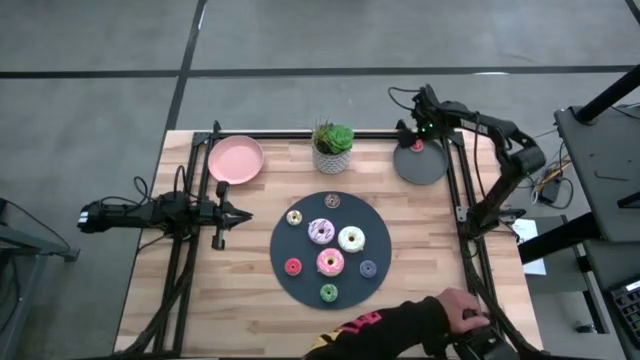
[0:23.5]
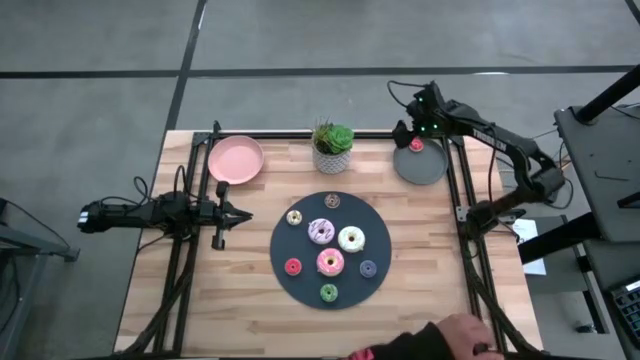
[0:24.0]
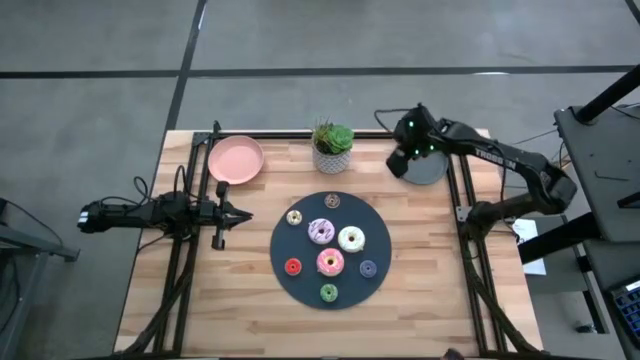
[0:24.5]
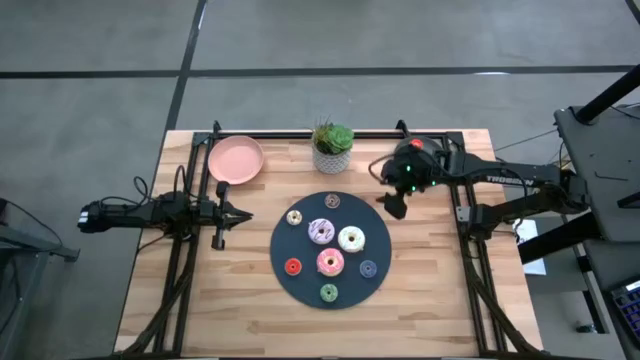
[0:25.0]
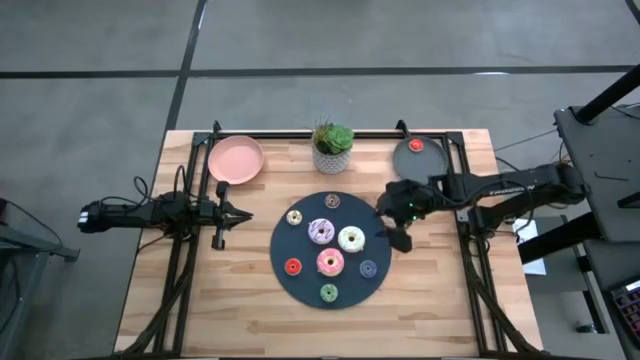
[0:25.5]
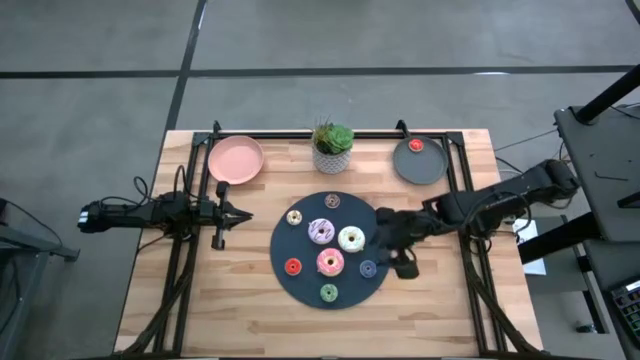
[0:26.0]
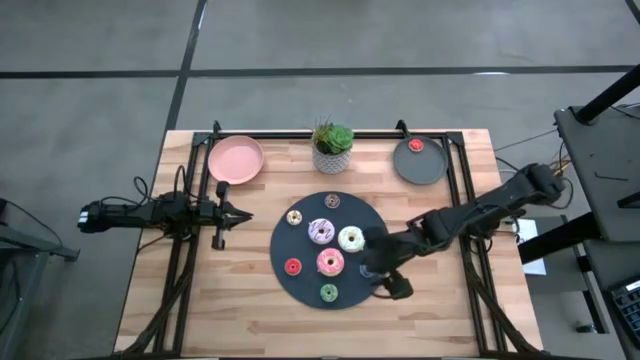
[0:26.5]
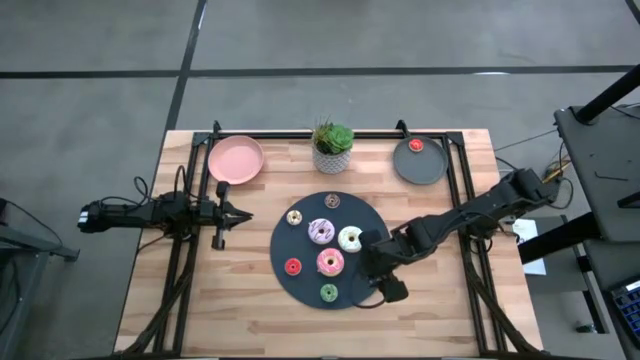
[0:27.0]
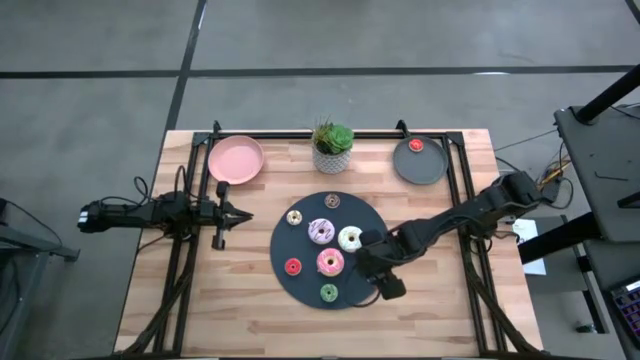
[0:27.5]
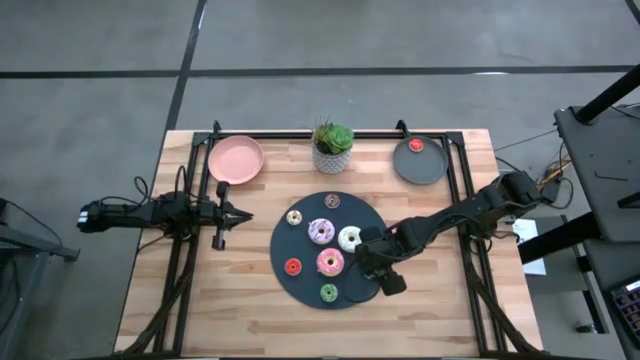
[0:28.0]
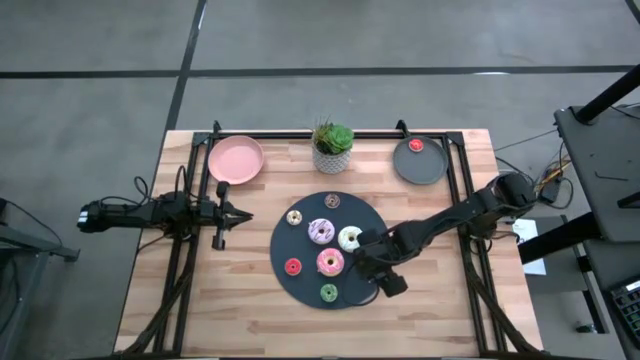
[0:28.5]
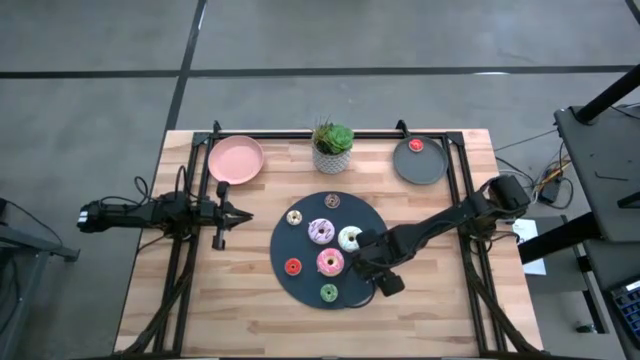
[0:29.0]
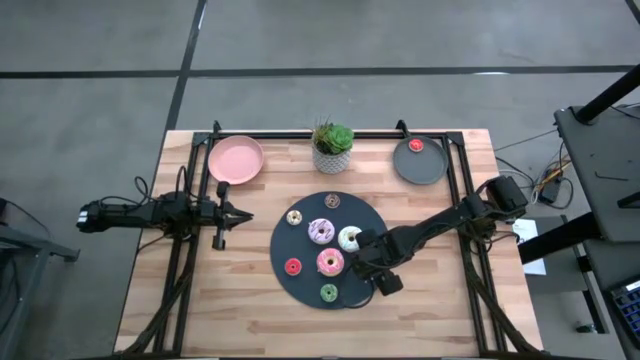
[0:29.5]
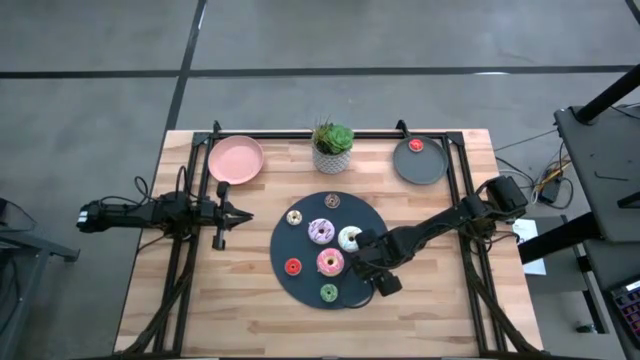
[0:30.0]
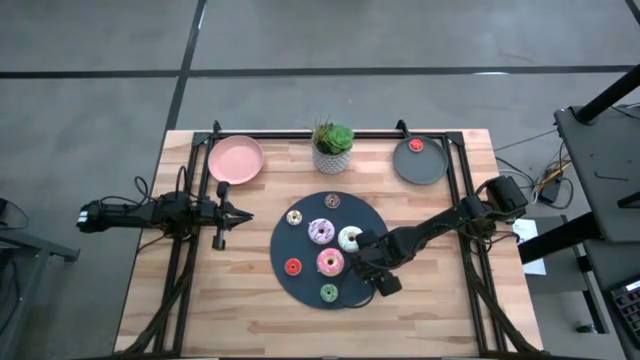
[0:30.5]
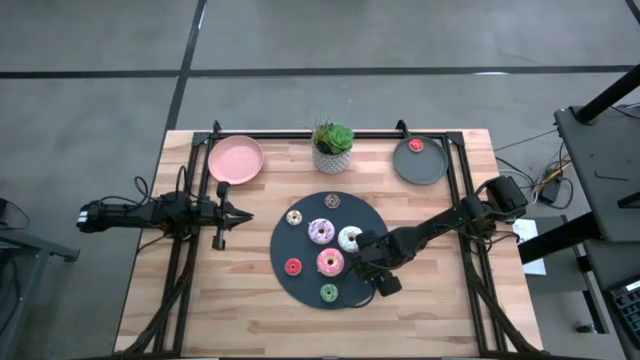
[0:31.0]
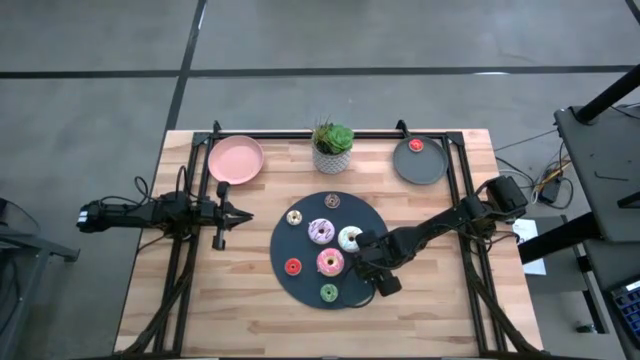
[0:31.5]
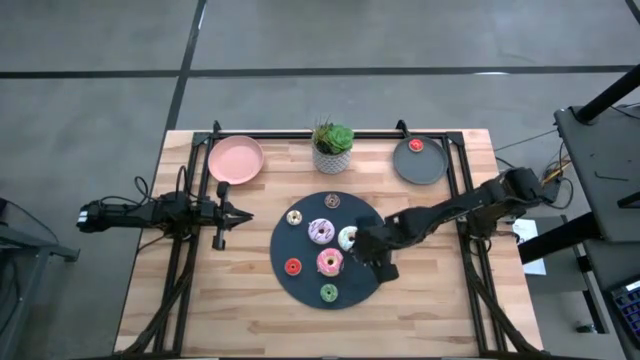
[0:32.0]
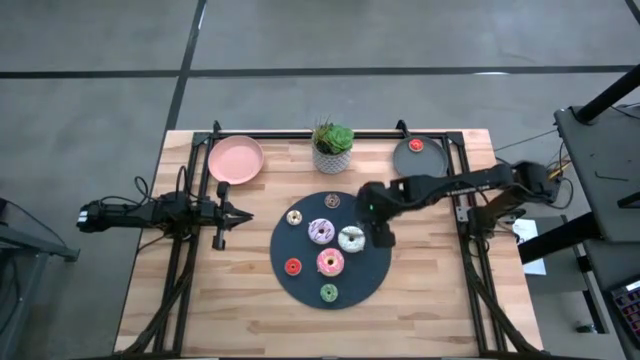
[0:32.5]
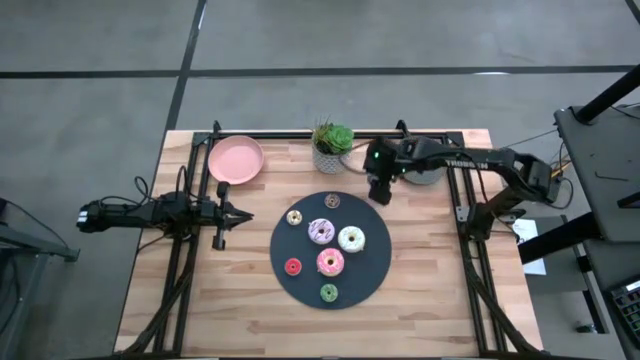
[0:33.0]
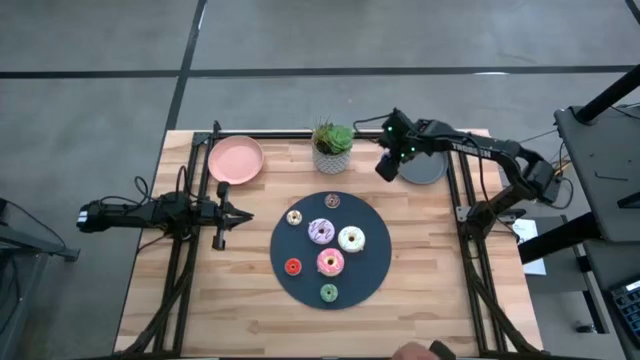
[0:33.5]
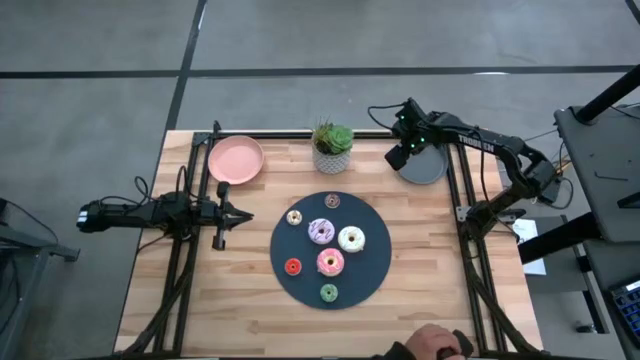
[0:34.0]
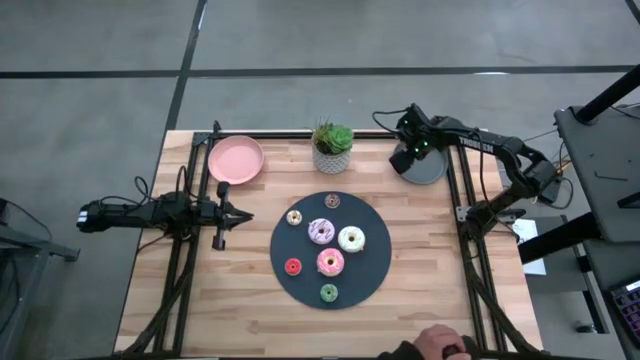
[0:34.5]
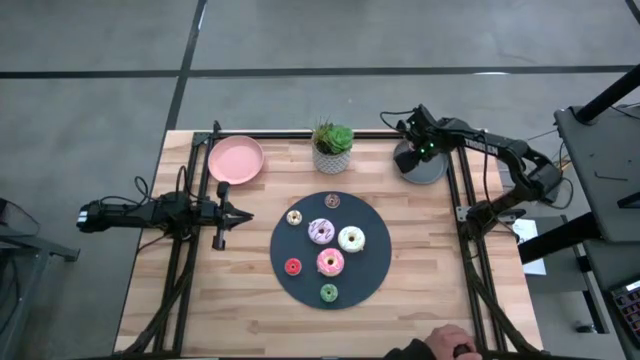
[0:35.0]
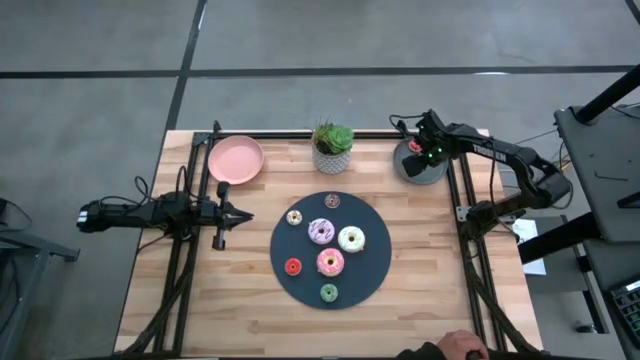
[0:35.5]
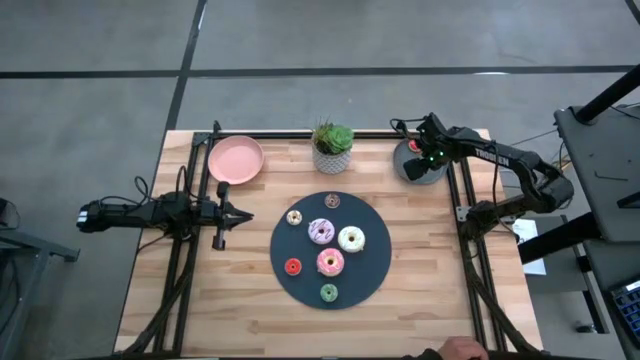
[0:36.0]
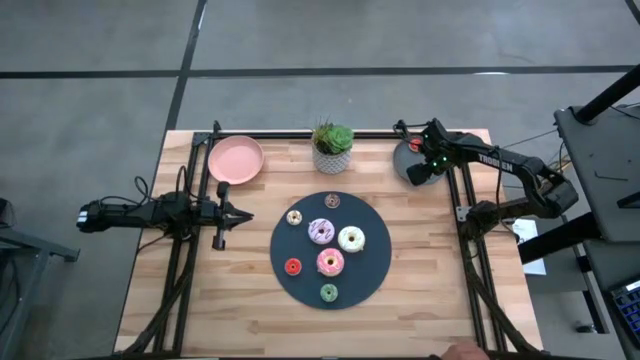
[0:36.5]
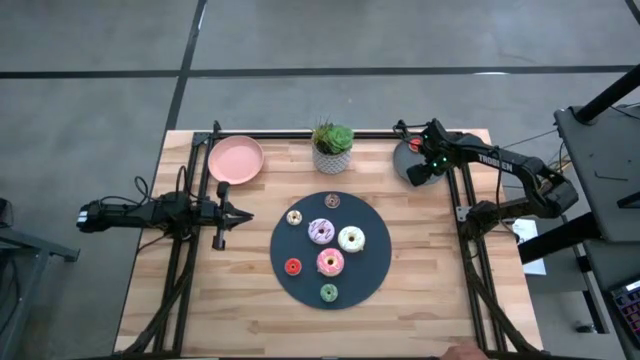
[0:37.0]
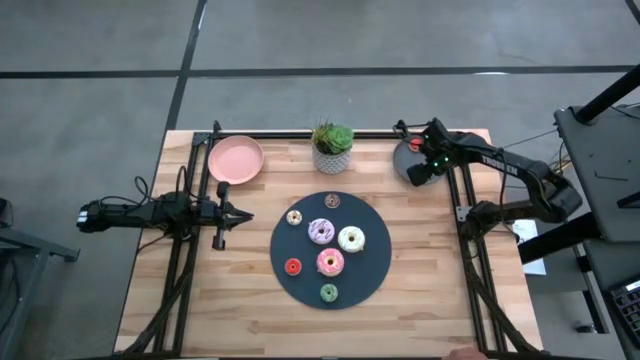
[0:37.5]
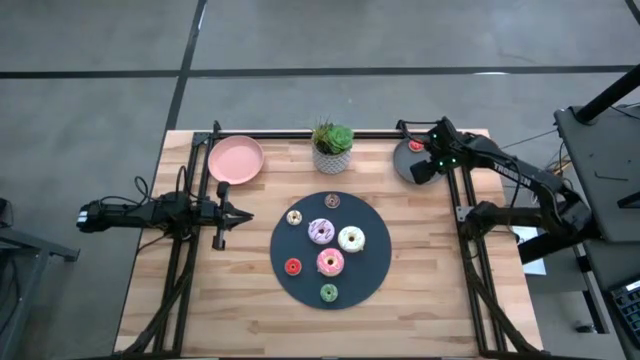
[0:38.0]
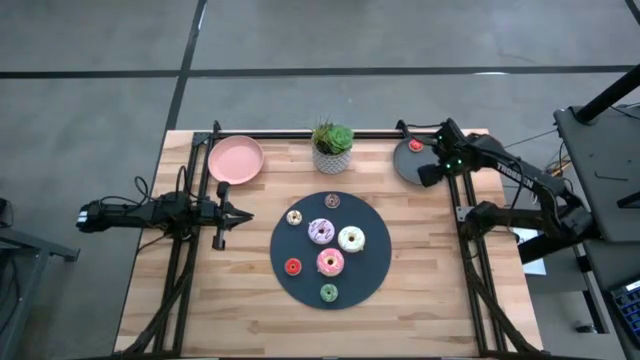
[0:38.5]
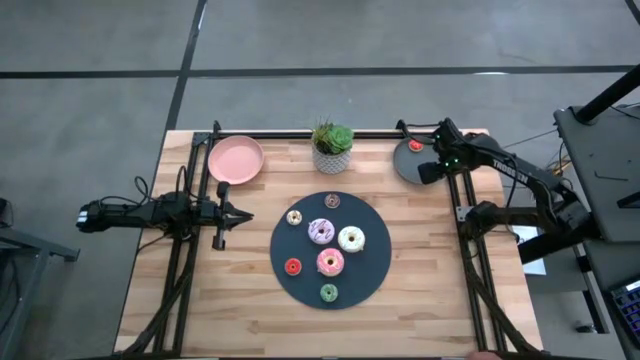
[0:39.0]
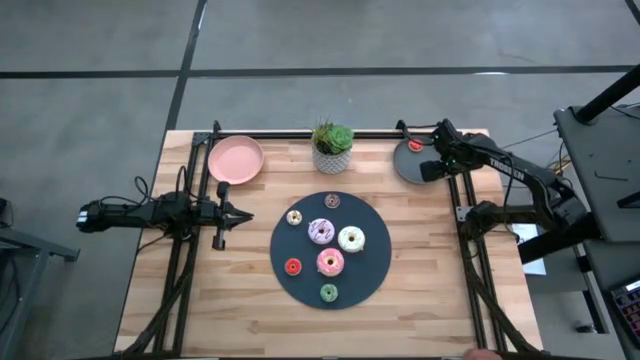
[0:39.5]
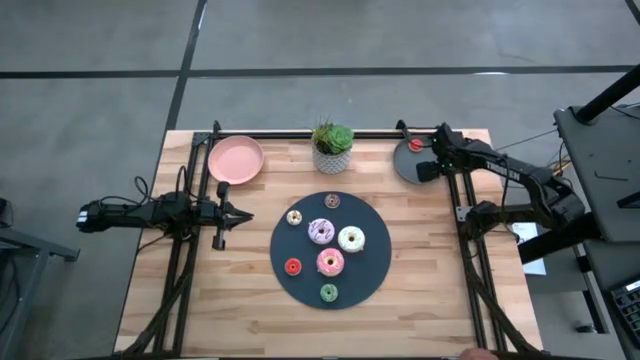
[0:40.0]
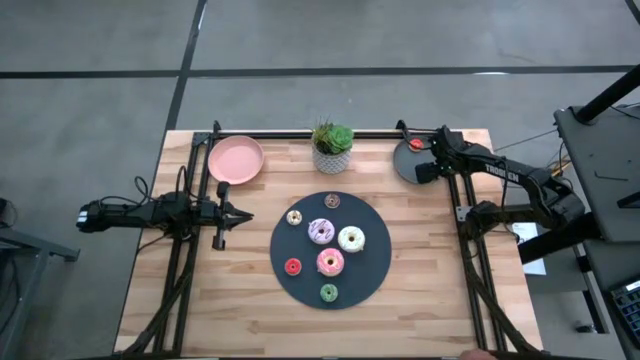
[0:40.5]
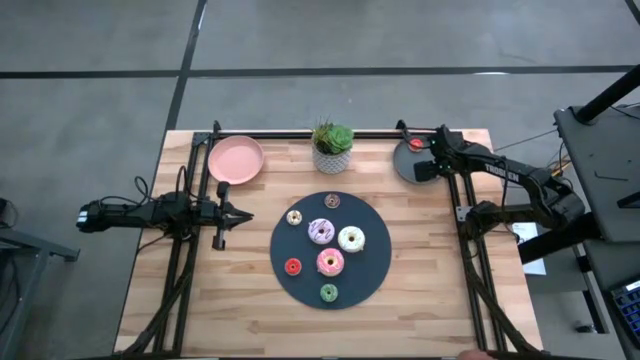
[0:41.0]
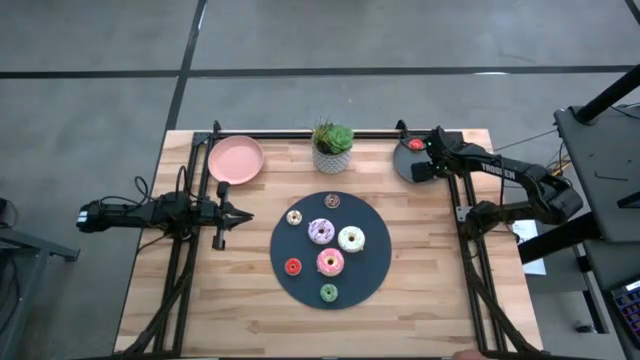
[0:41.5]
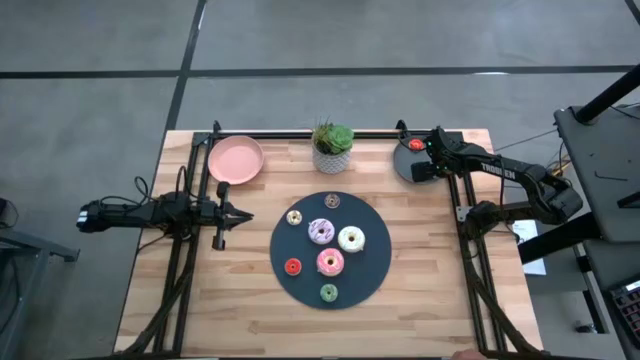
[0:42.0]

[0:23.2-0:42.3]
Task: Pick & Place donuts
Put the small blue donut on the gray plate

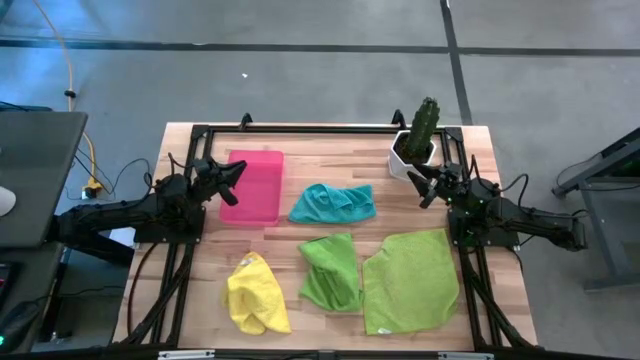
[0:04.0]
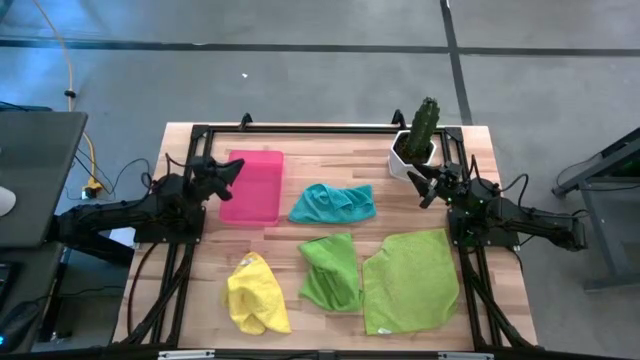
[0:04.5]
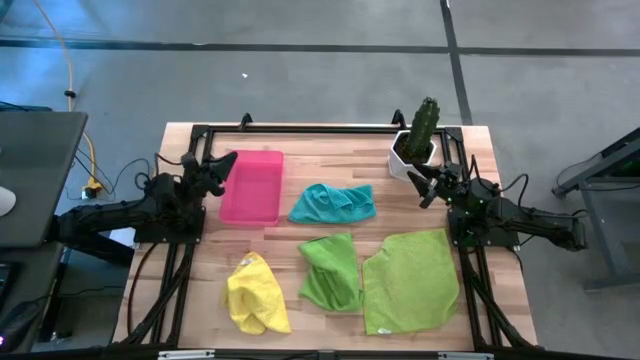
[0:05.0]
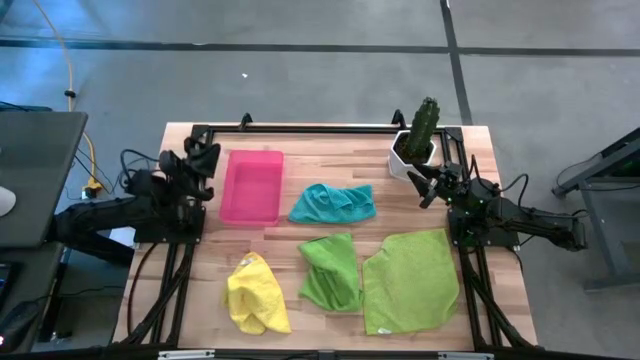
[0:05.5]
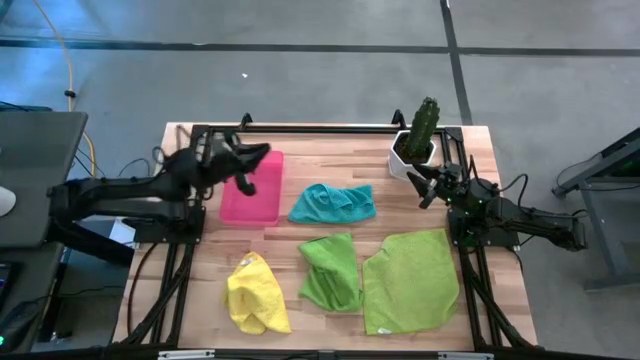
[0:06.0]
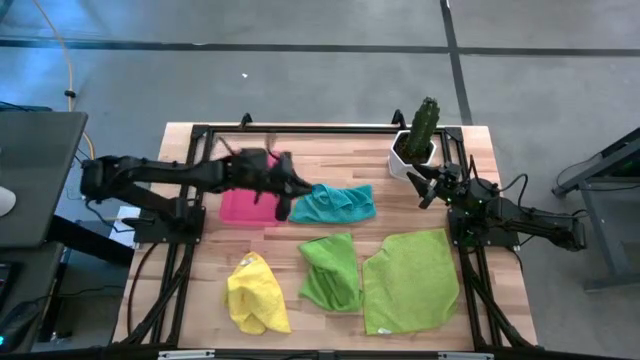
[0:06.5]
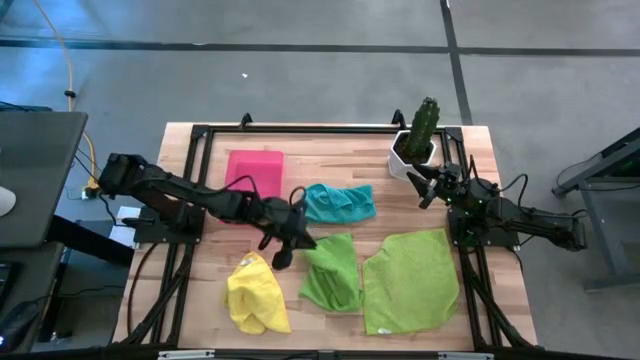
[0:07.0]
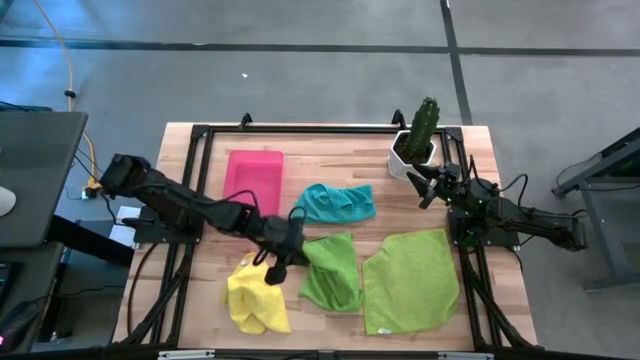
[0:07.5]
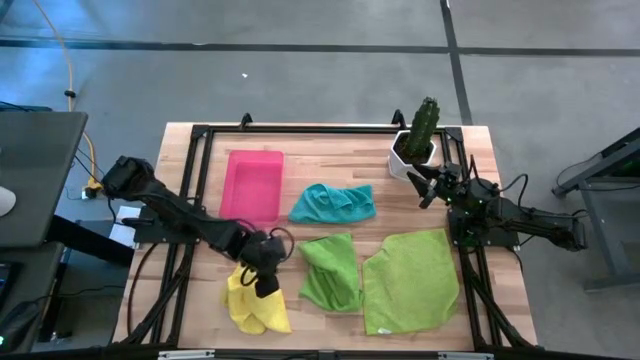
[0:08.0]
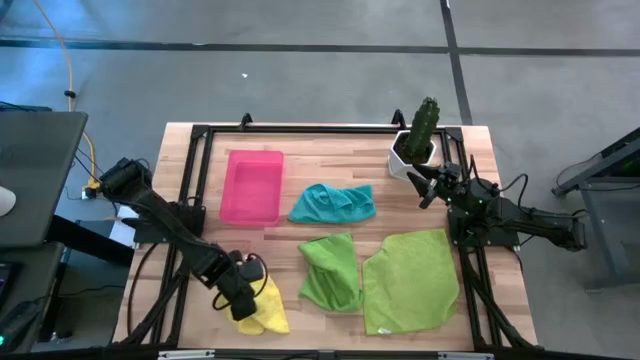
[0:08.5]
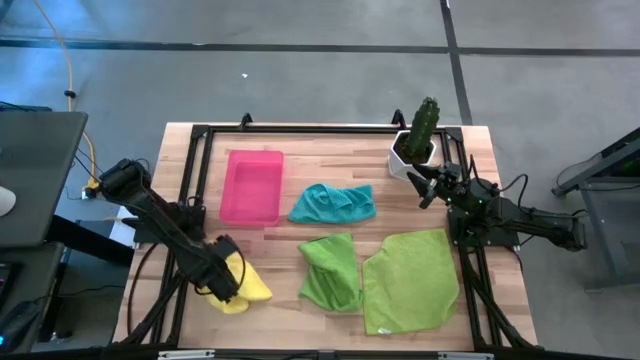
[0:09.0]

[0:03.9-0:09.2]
Task: Roll microfiber towels into tight, uniform cylinder then place into a basket
Adjust the yellow microfiber cloth
